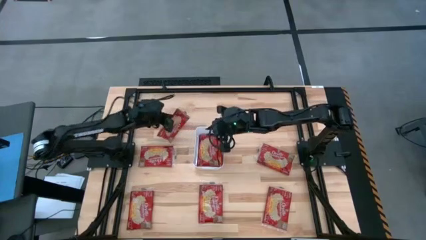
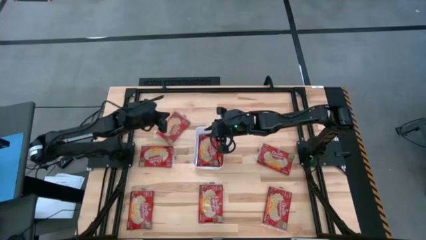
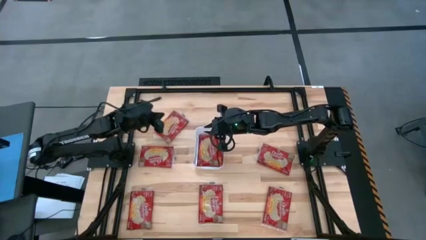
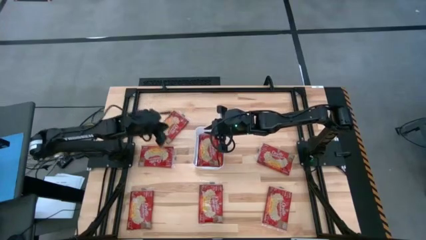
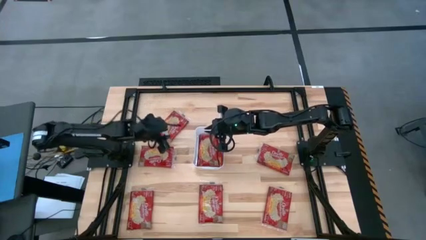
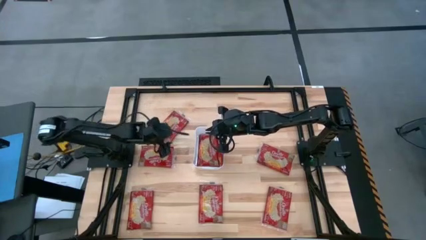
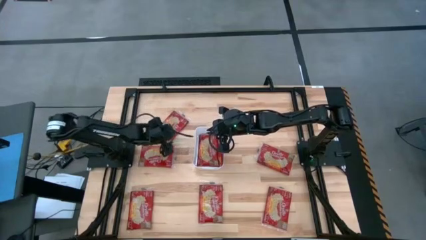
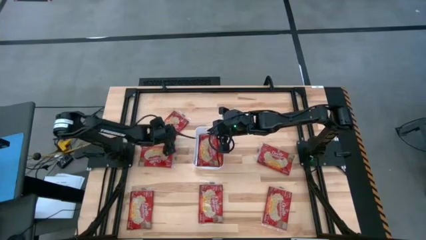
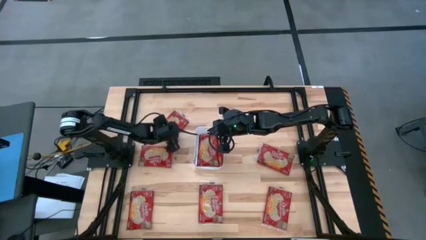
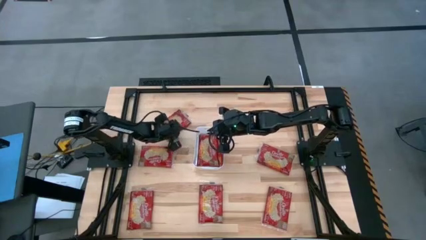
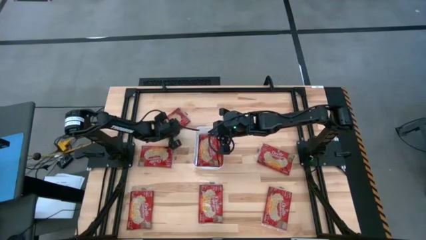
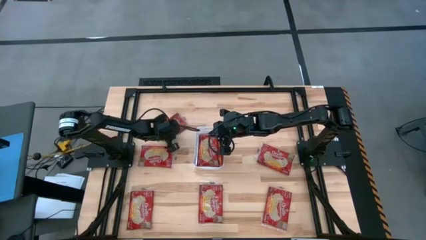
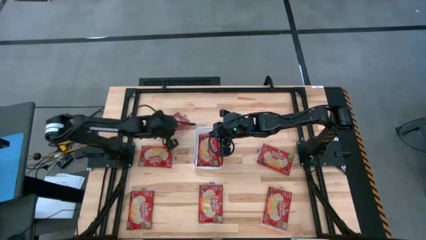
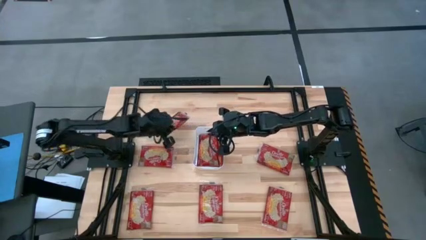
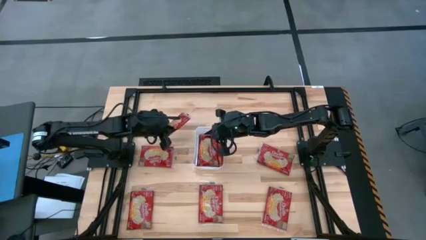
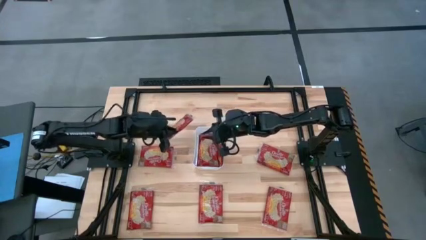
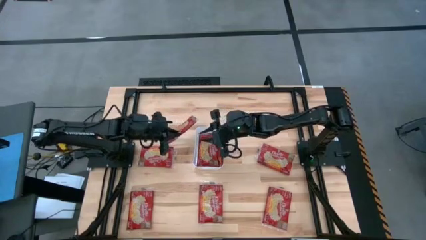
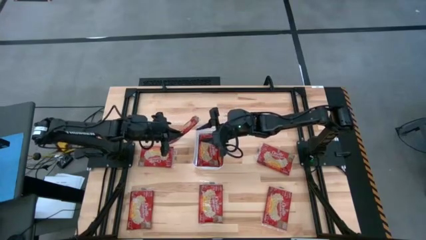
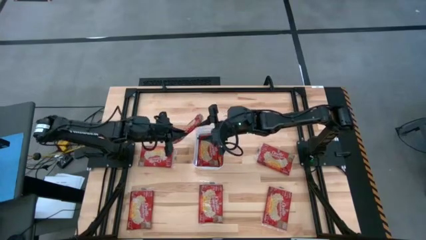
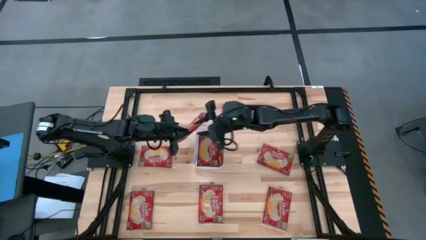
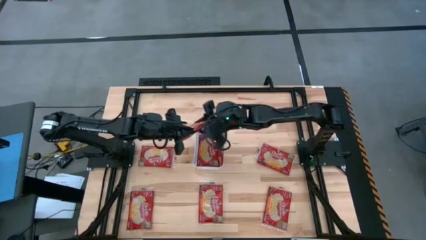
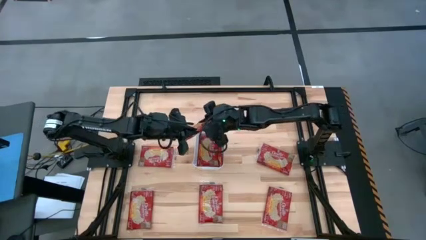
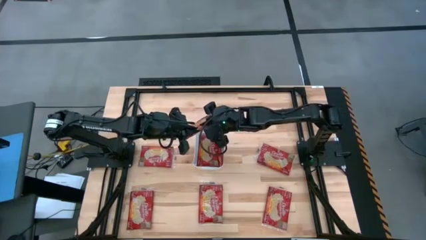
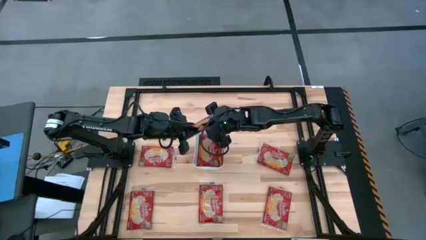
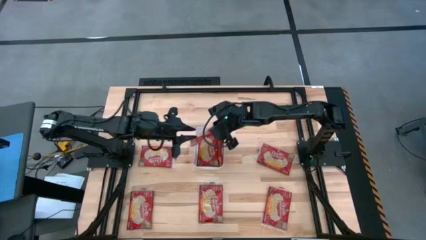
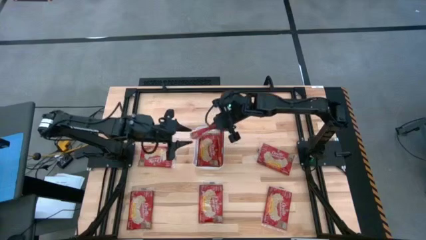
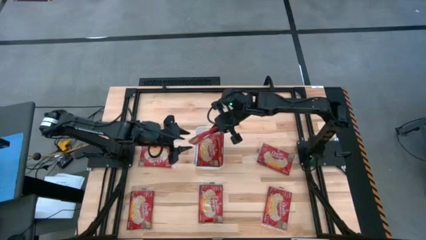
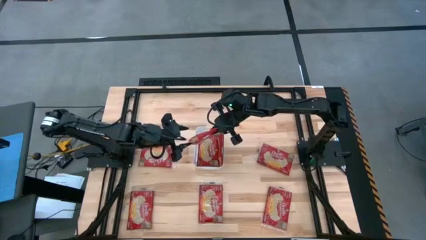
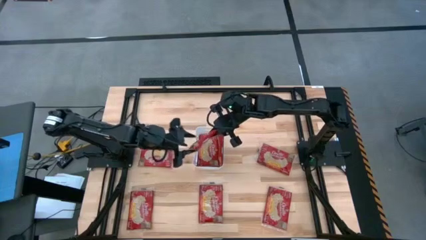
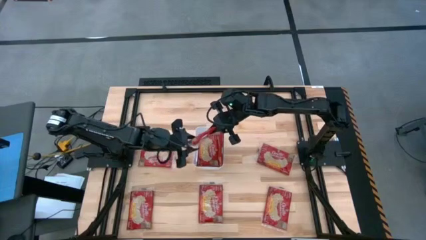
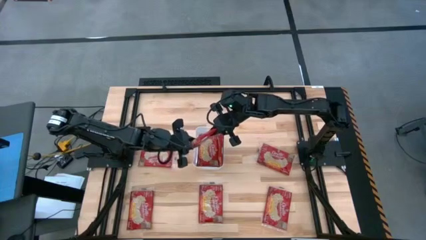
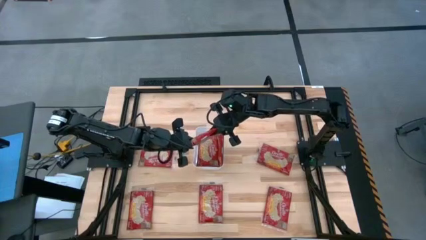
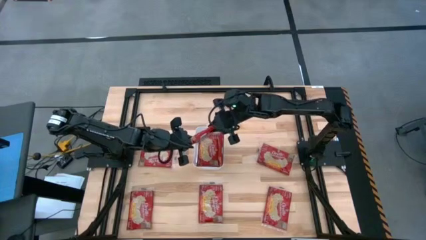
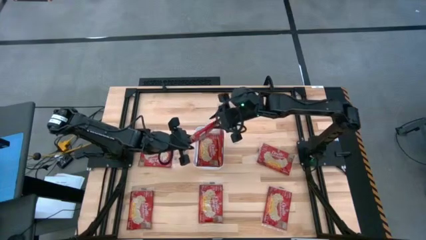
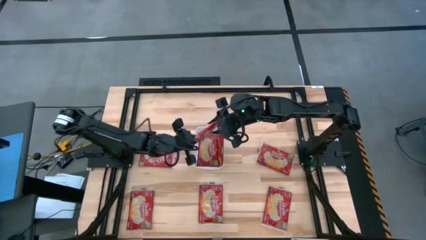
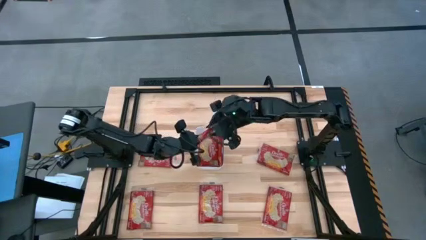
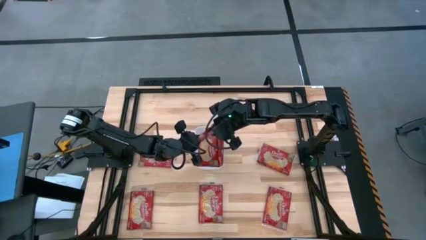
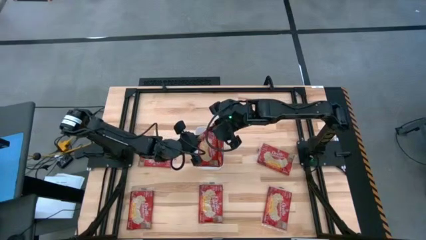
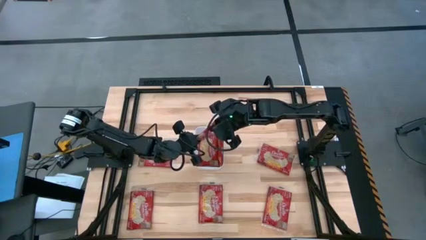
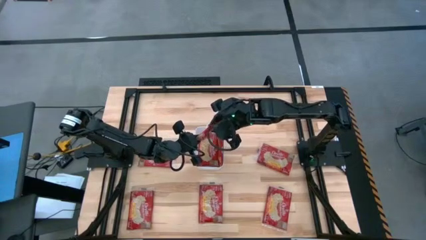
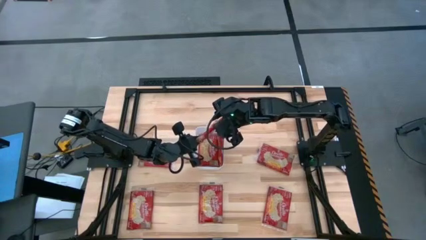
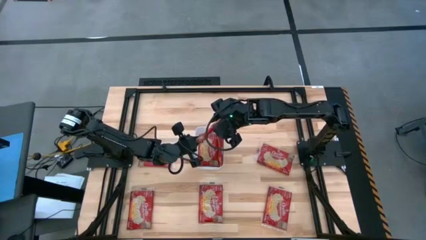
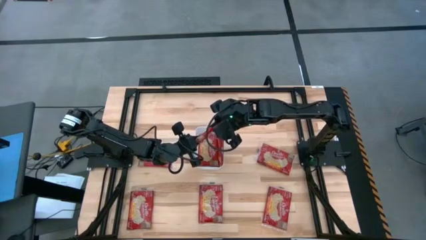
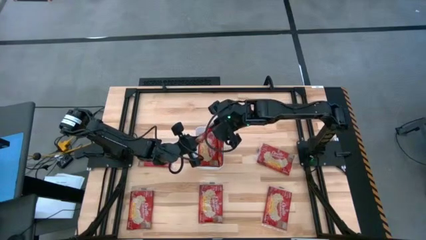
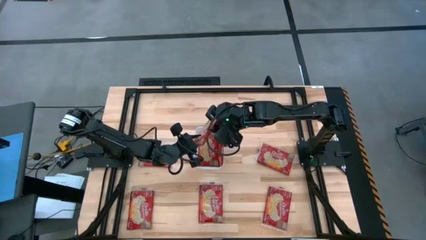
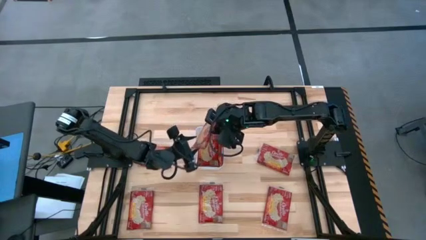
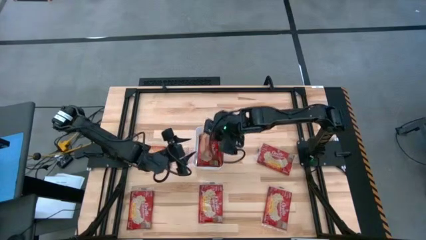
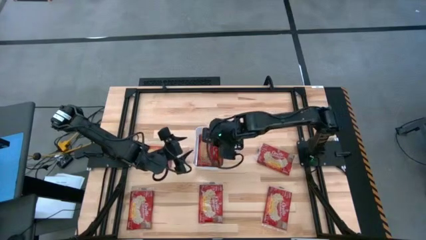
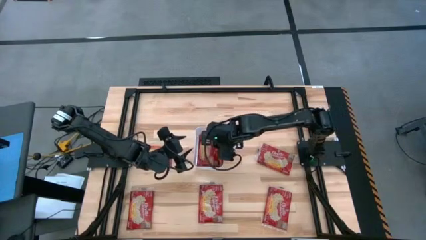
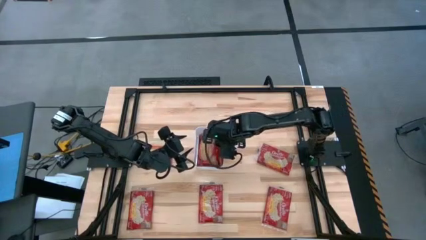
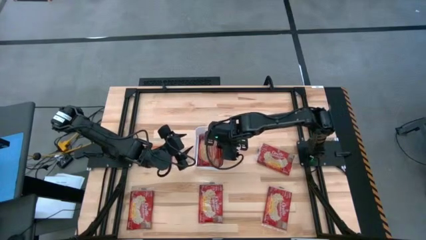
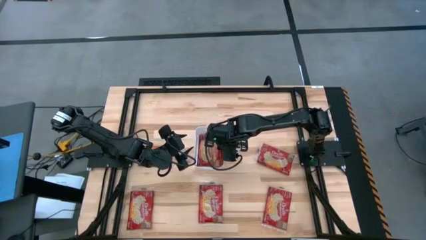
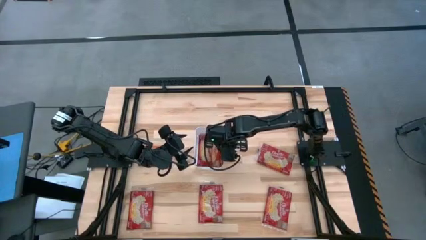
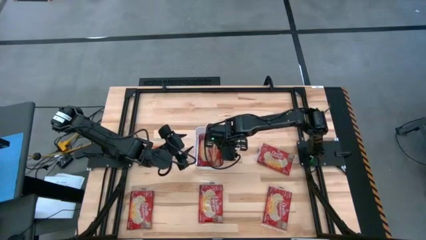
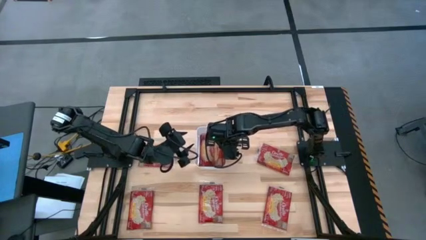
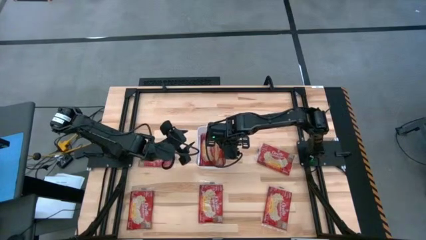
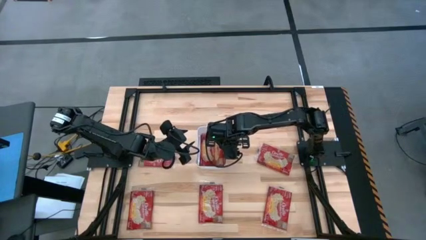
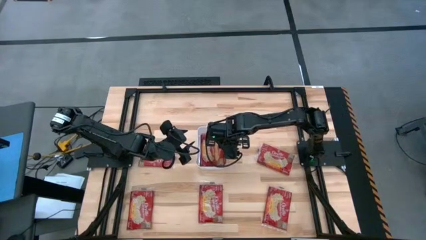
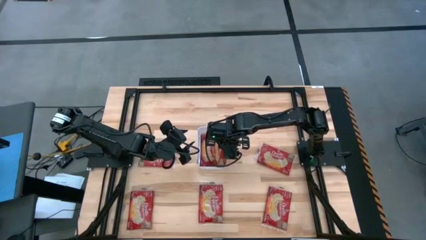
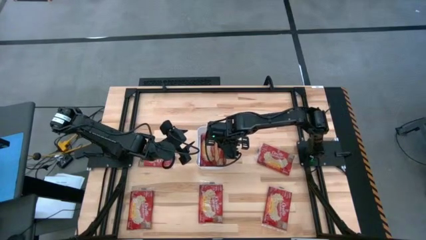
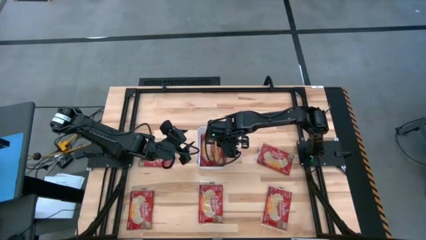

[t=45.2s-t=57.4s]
Task: Sort popcorn bags into baskets
Put the red popcorn bag into the white bin

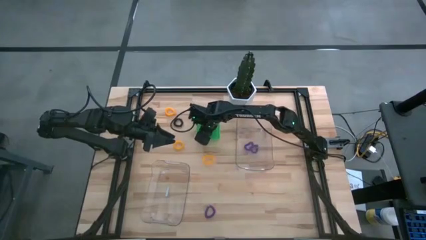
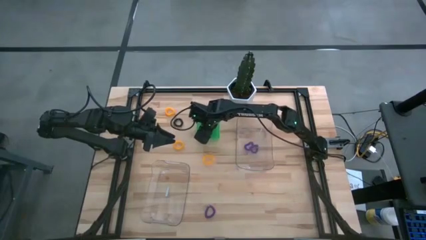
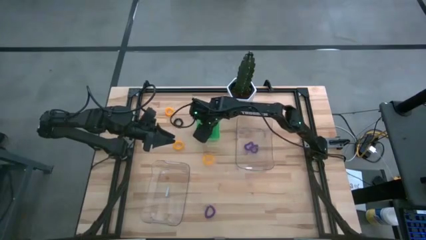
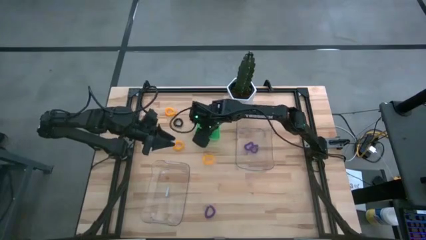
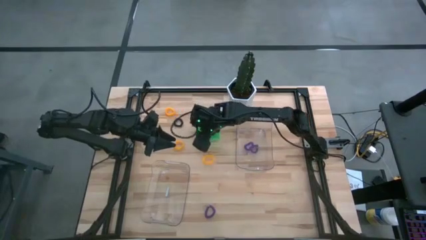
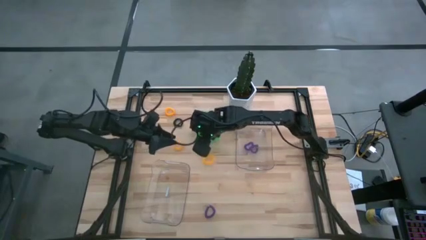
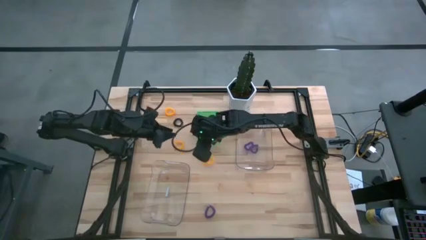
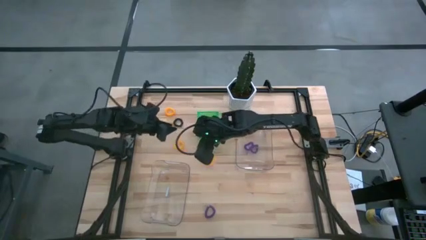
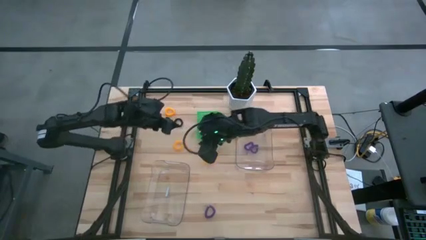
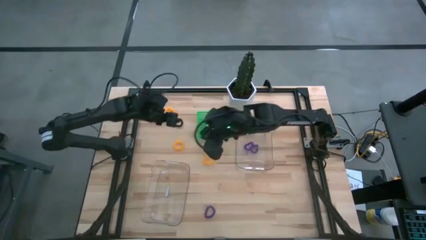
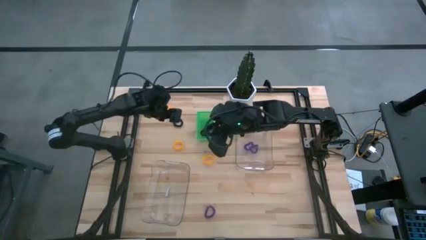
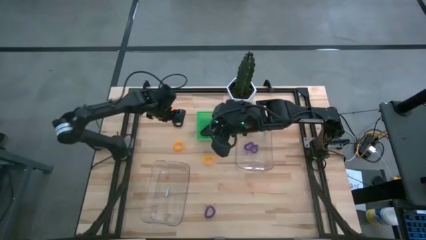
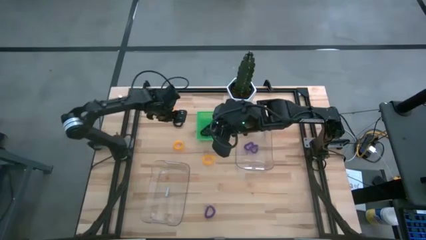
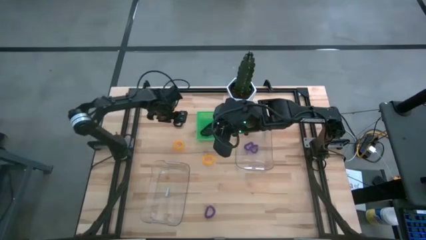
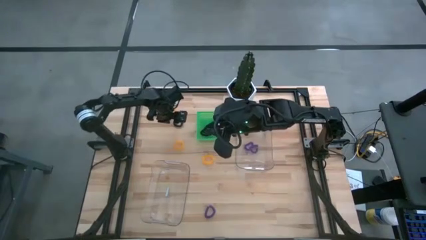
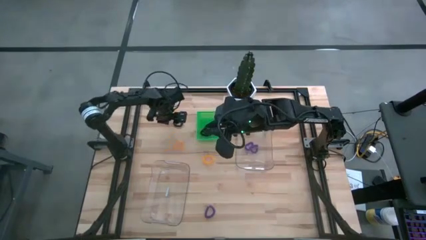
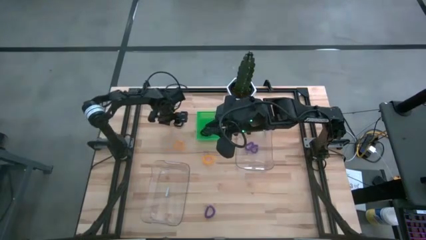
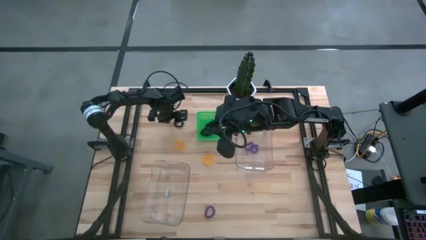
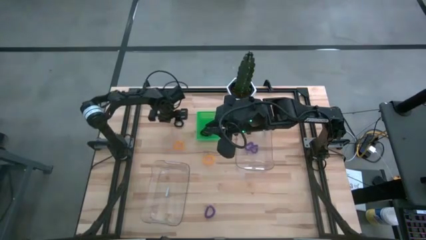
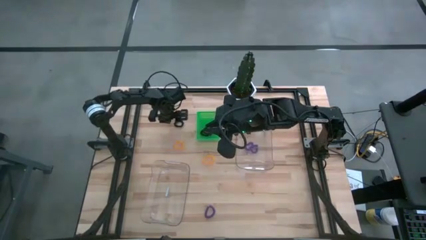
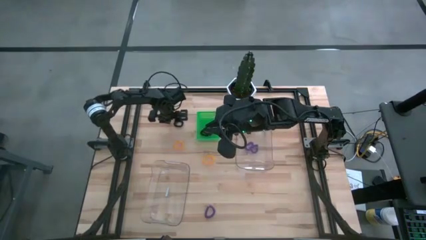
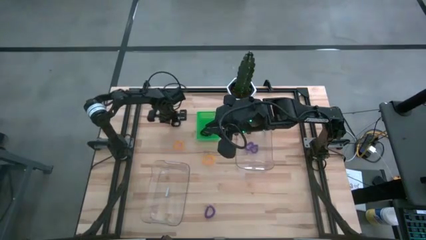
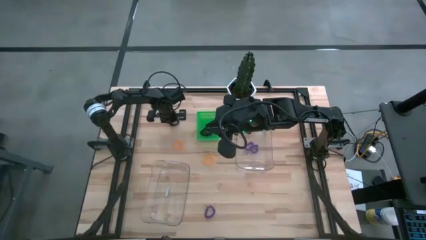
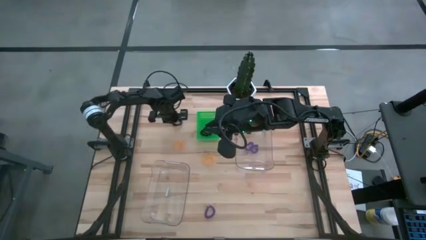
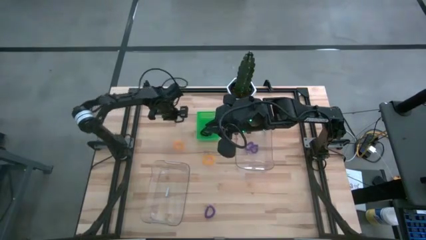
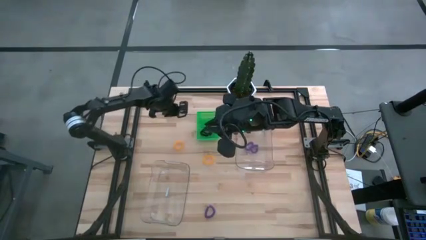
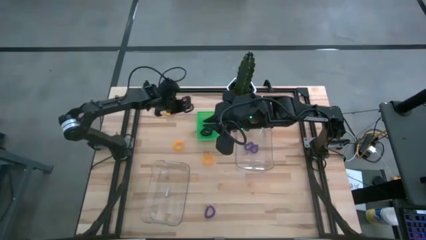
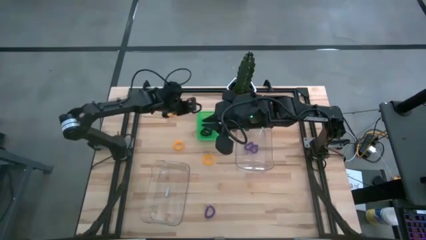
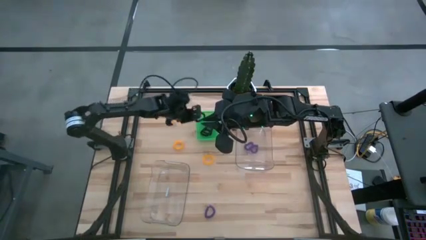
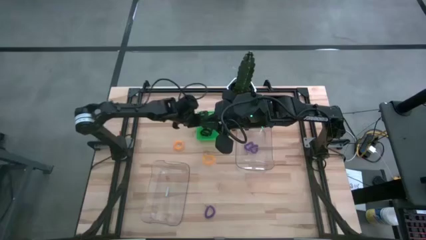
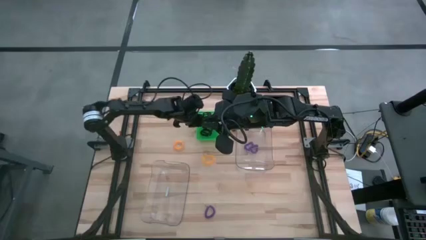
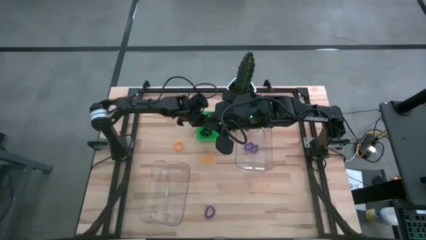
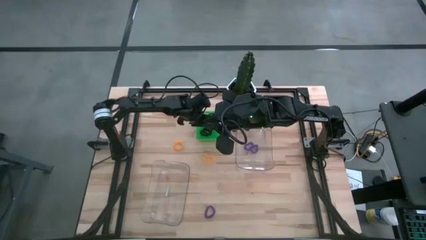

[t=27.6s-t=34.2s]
Task: Sort spring keychains
Put the black spring keychain into the green bin
